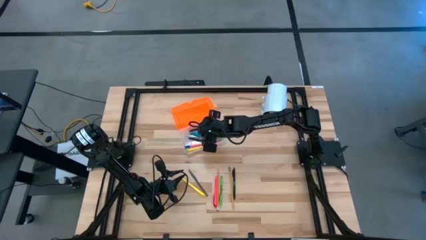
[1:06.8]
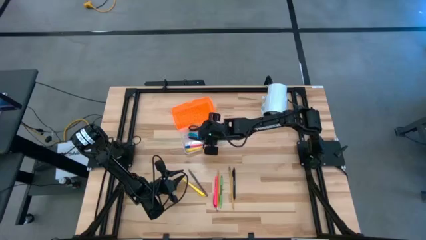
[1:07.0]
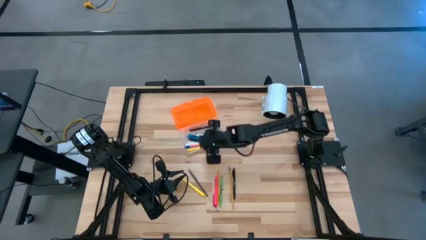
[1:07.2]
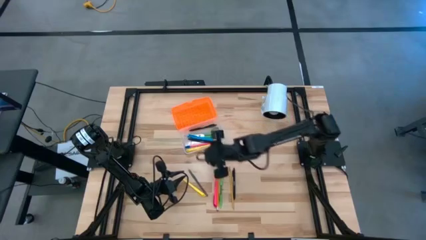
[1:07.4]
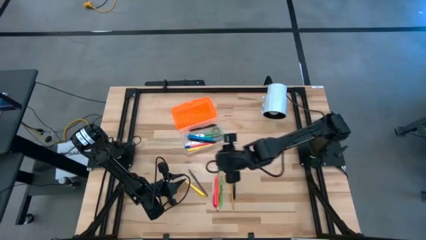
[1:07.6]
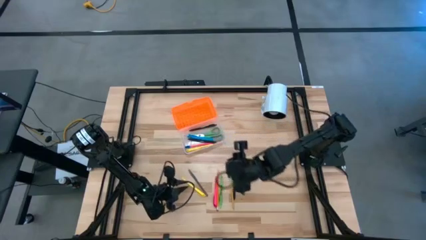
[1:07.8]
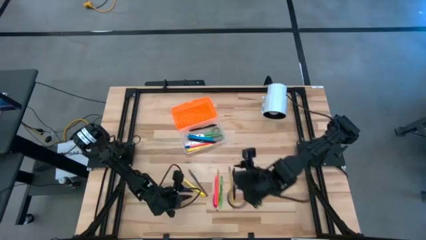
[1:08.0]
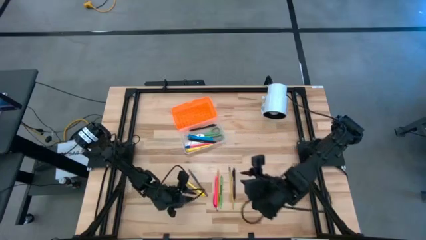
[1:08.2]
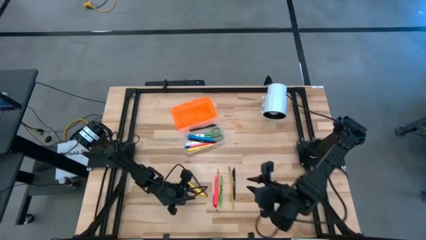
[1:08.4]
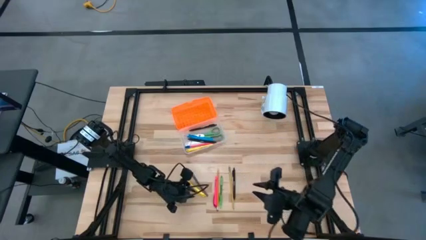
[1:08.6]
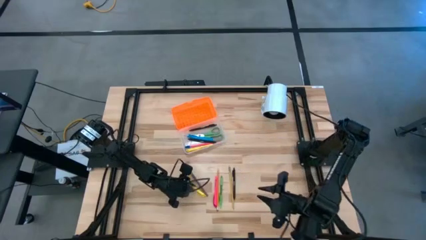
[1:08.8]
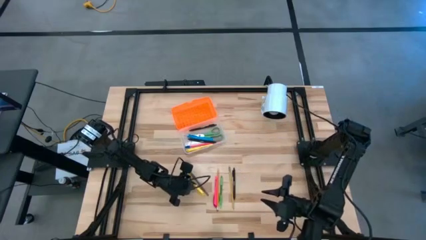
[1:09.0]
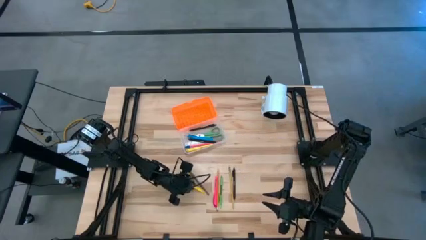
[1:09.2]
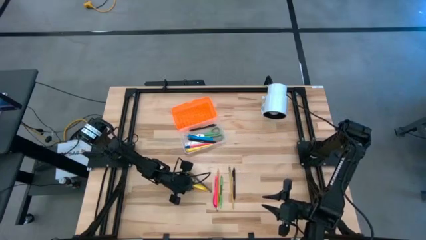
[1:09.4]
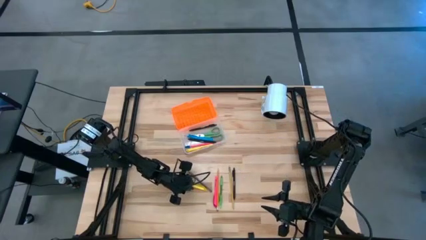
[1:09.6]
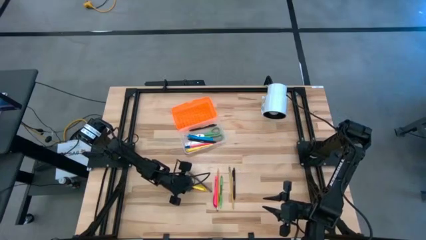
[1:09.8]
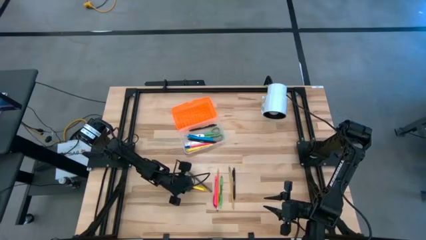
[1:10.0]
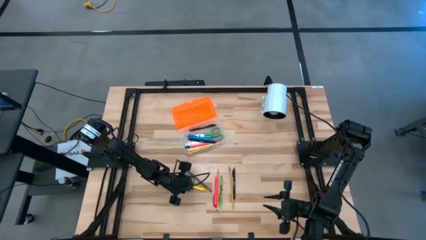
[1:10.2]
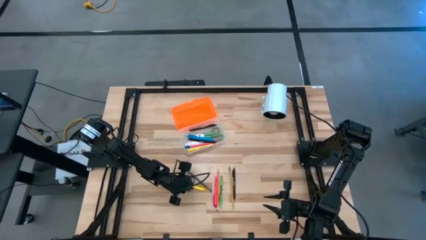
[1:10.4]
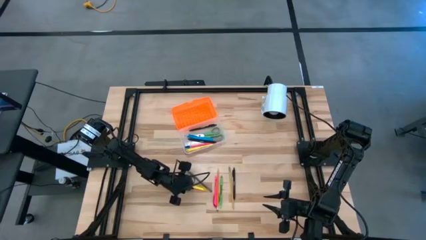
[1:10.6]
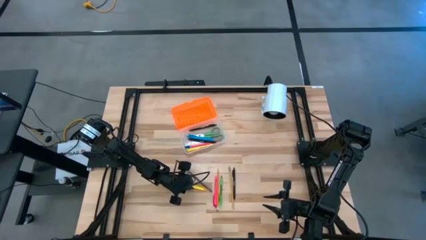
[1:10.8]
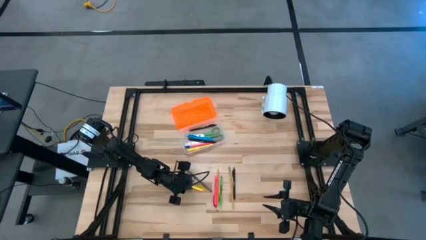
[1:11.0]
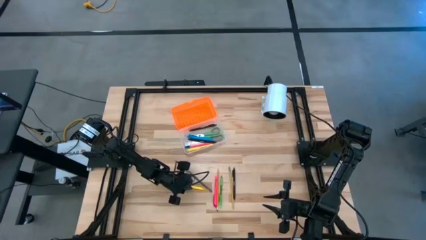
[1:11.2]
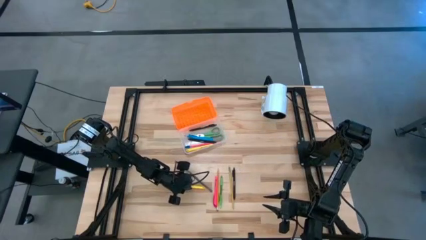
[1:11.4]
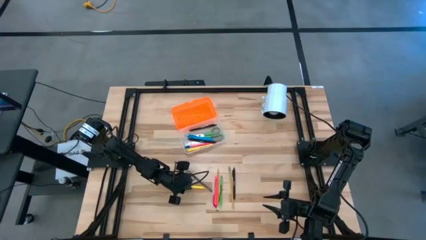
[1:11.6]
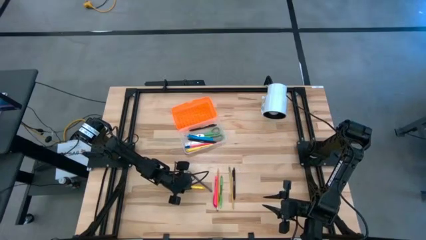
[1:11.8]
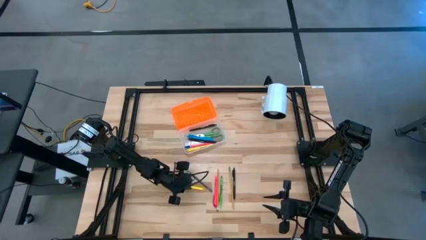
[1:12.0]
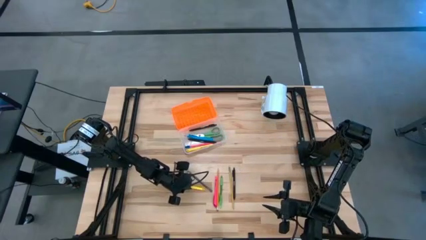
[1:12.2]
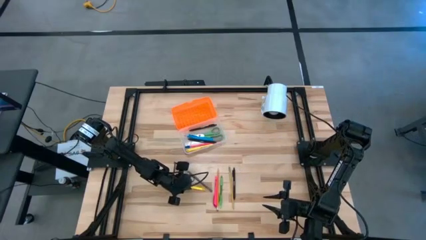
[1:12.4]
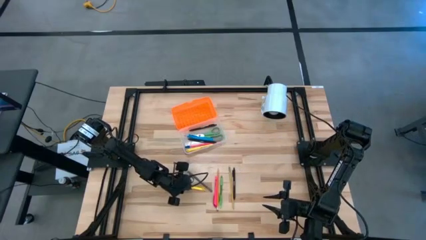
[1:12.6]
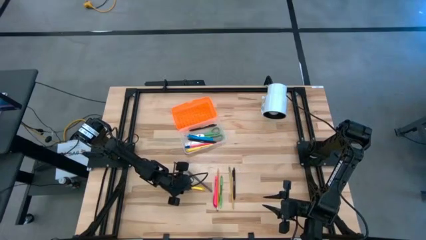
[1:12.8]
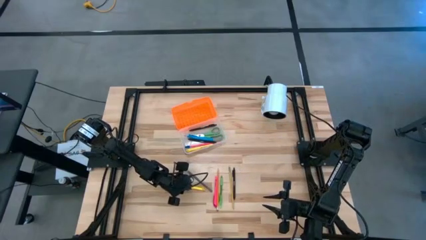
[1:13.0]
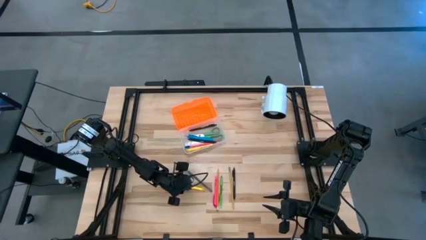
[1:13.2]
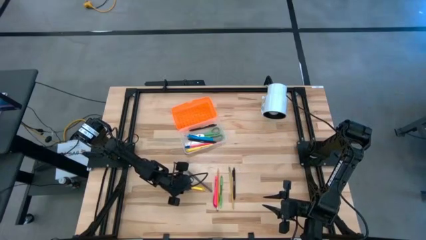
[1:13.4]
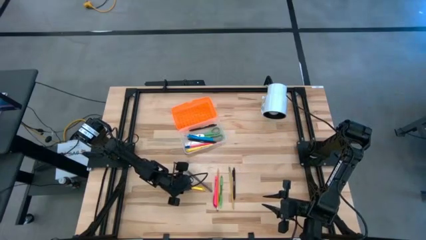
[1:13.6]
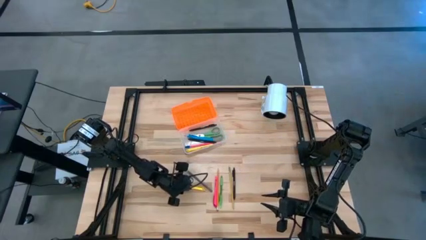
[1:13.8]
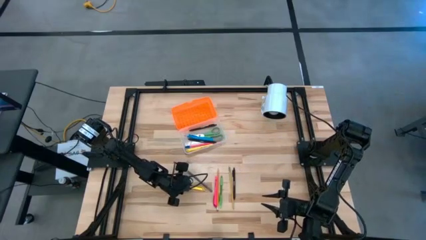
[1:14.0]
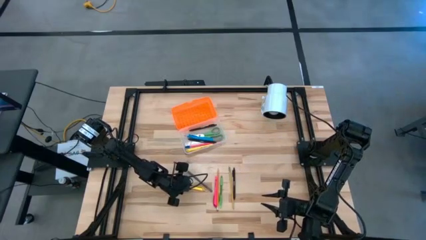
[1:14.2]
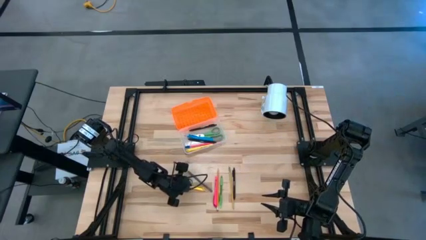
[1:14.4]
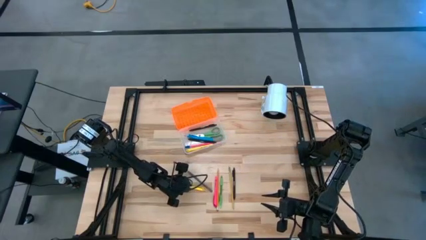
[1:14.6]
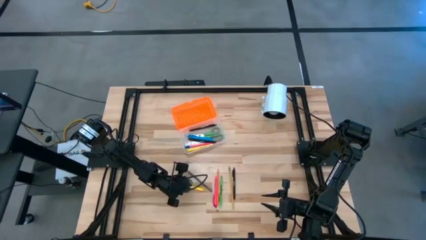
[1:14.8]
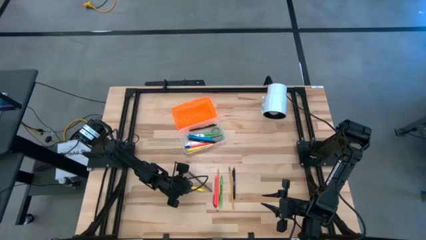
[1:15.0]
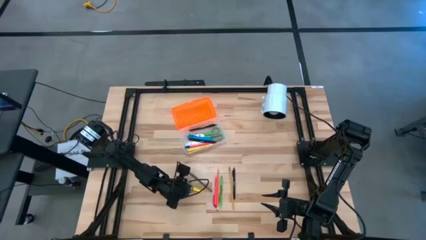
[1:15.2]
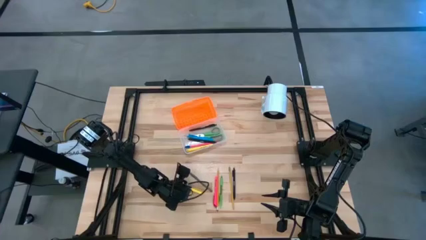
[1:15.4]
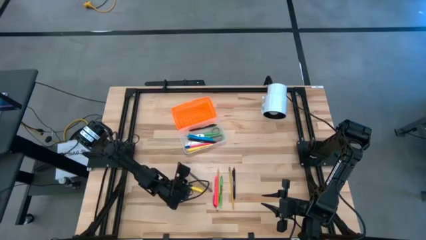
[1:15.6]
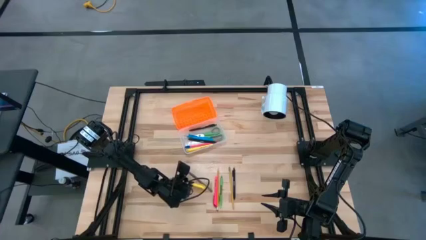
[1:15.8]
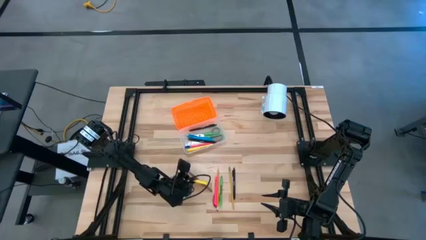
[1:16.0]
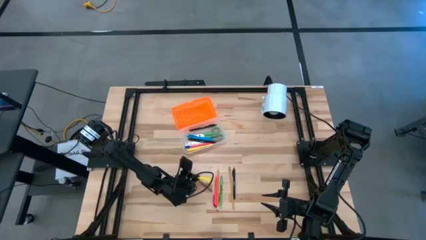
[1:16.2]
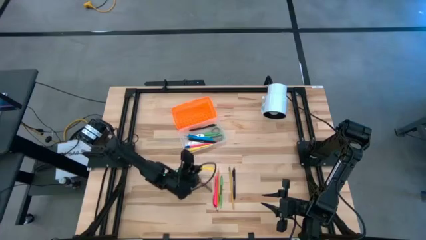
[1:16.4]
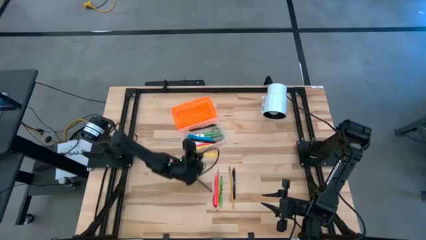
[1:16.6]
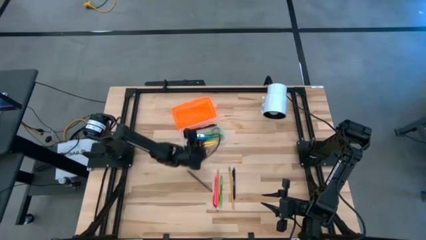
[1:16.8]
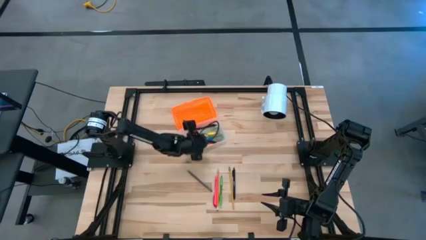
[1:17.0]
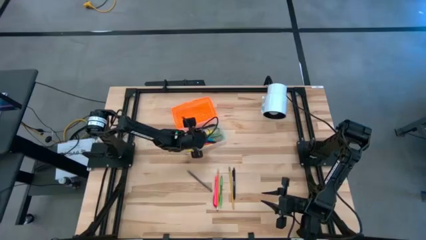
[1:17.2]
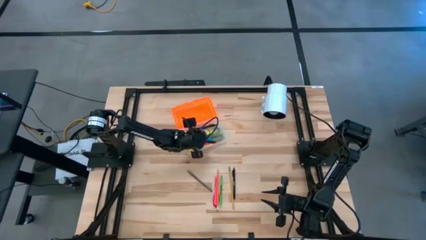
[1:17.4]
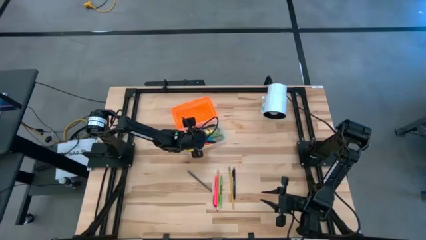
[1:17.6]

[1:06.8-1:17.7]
Task: Pick & place school supplies into a supply box
Put the yellow pen into the supply box

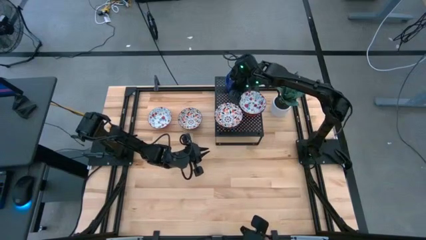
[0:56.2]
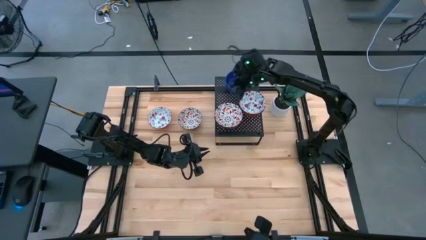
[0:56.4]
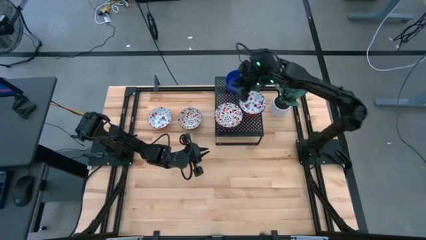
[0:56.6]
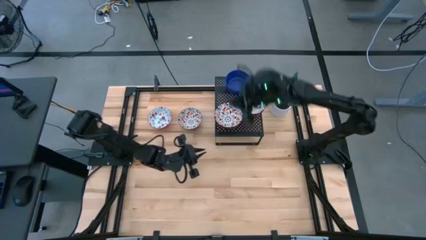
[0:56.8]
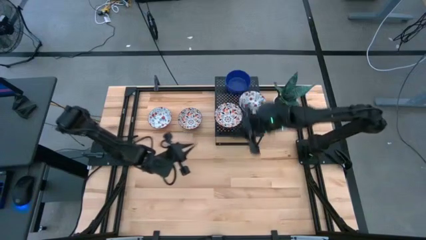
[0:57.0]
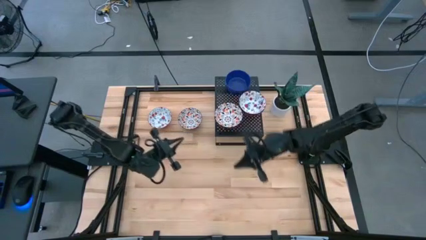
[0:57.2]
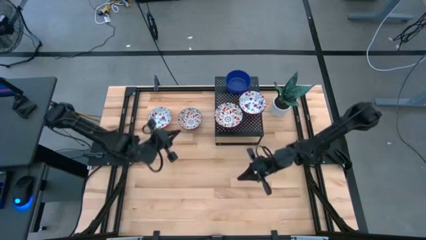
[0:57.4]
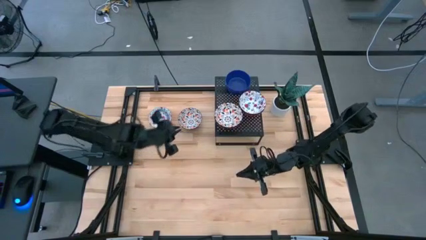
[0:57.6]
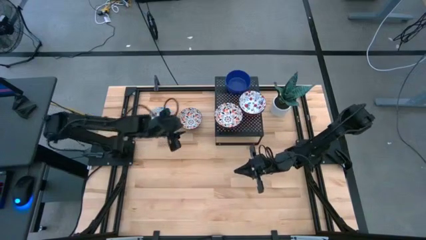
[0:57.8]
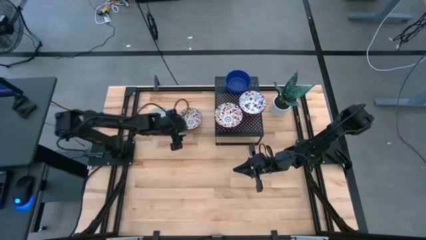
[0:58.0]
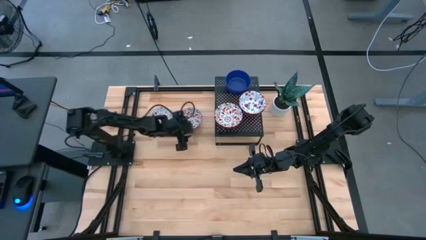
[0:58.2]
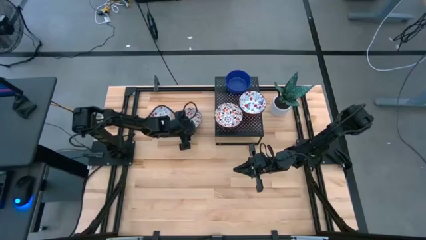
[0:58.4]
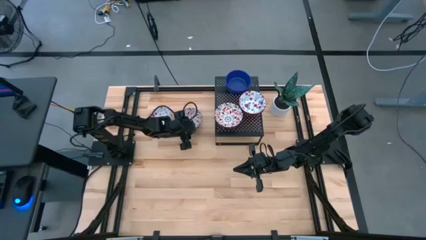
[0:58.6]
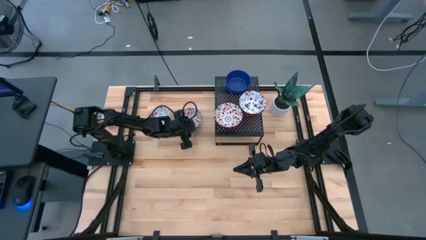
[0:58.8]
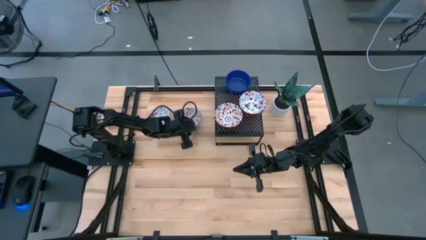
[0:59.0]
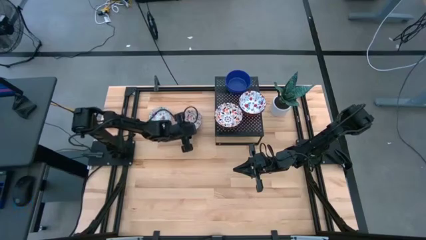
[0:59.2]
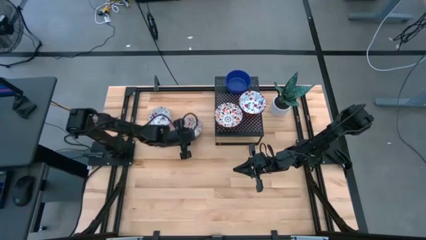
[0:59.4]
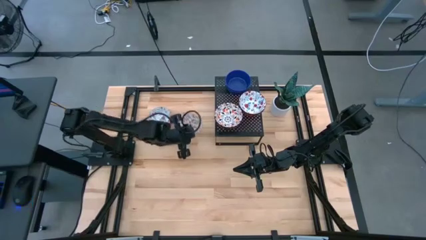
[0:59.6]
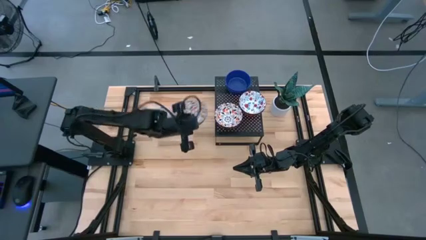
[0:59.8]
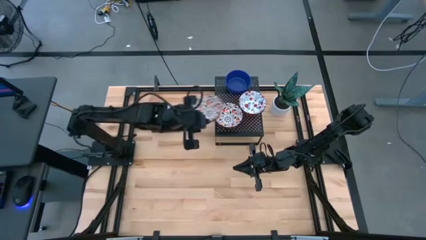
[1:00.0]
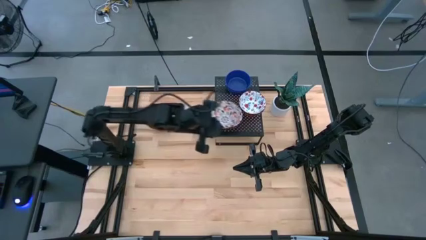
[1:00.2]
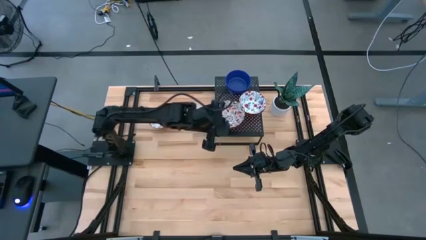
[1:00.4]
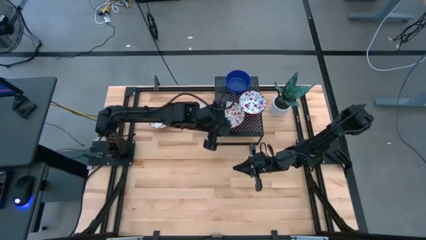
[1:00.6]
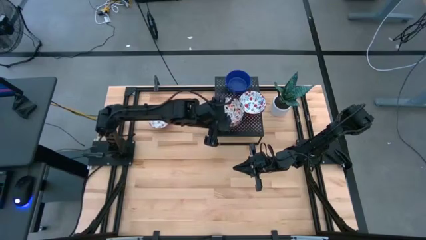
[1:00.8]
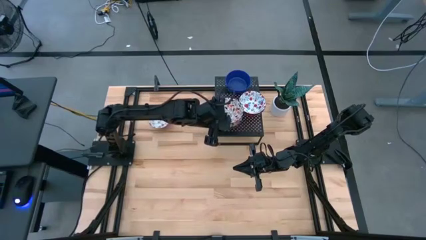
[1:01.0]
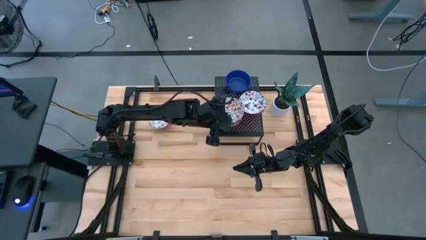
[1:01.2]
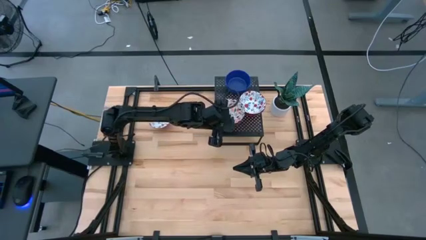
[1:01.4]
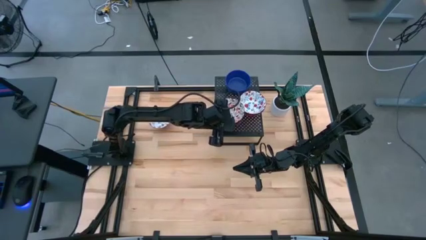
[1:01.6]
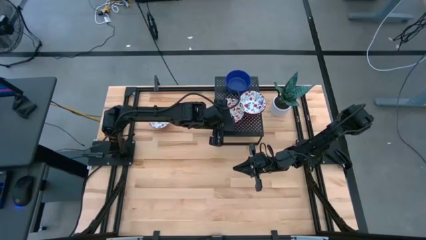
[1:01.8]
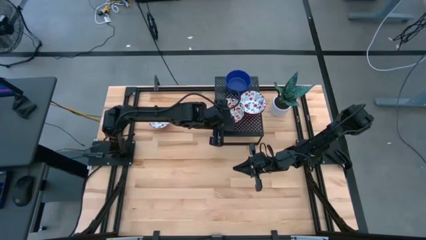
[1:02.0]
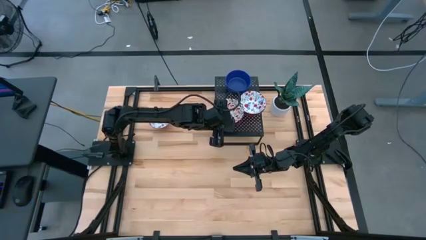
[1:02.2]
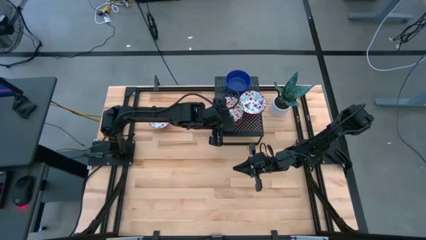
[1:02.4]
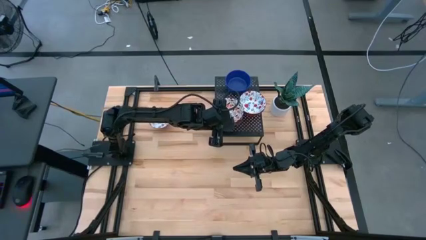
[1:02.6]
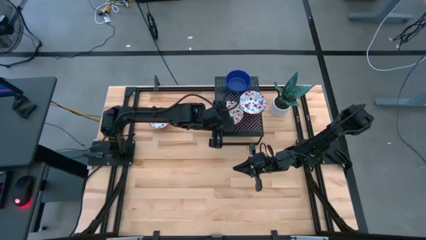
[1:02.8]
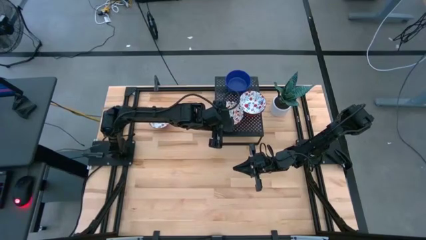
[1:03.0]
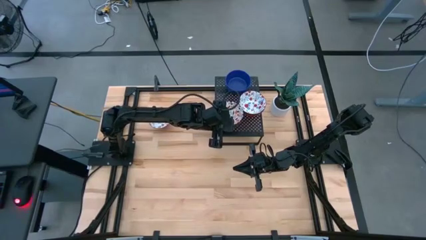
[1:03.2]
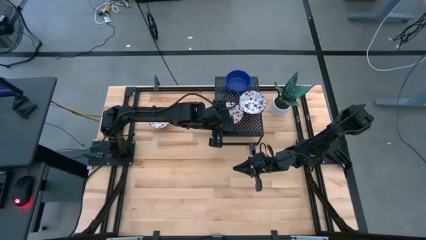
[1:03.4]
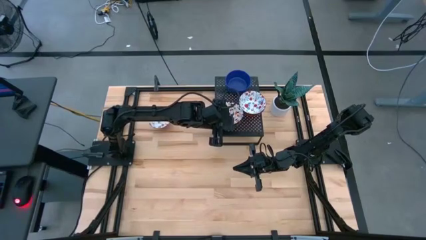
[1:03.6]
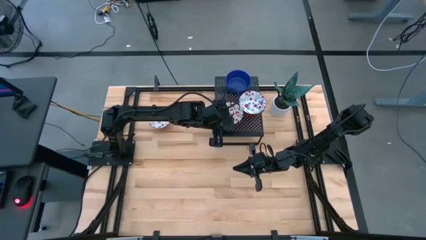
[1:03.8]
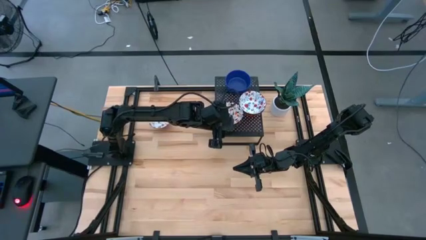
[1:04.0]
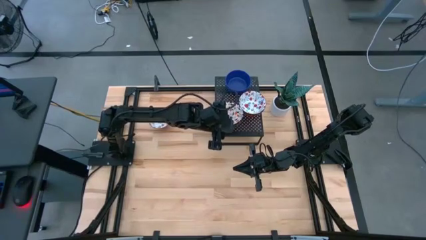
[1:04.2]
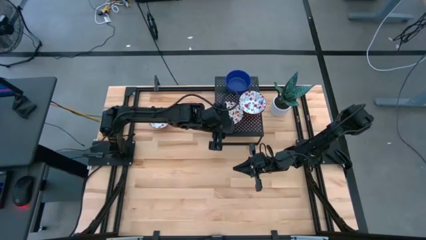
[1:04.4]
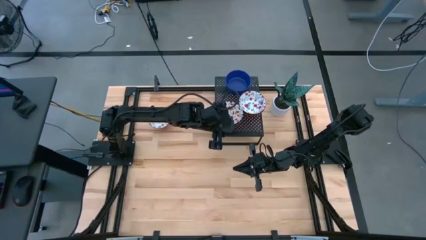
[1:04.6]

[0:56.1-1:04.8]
Task: Pick & Place Mini bowls
Stack the black bowl on the black bowls on the shelf
